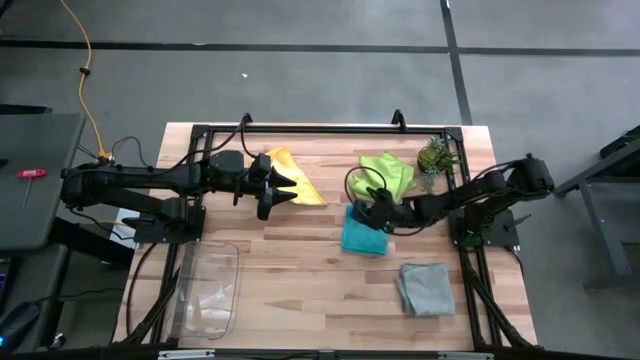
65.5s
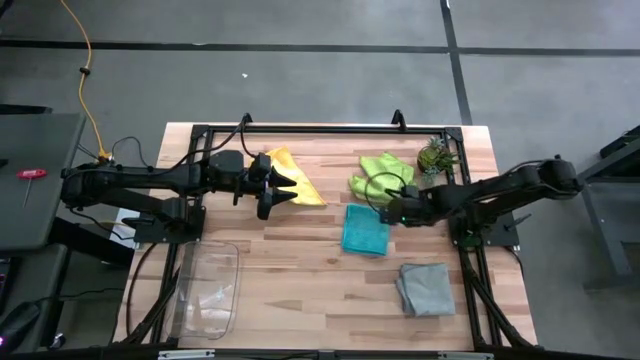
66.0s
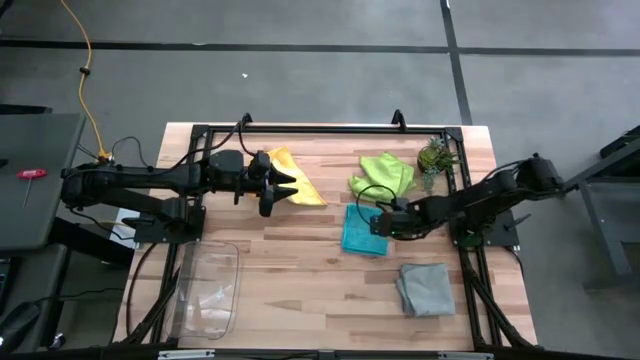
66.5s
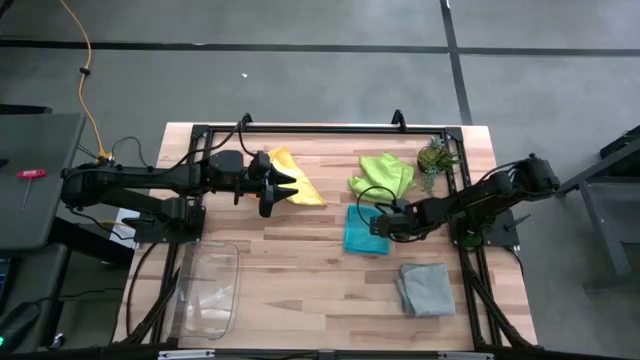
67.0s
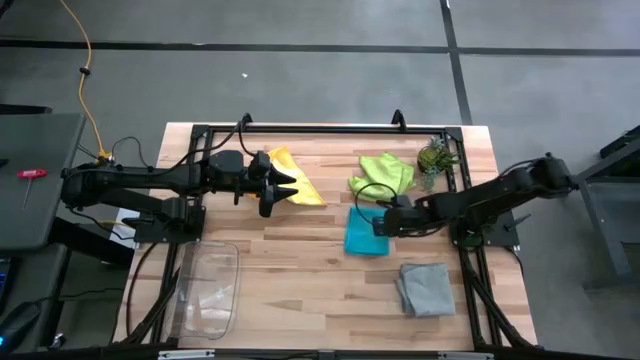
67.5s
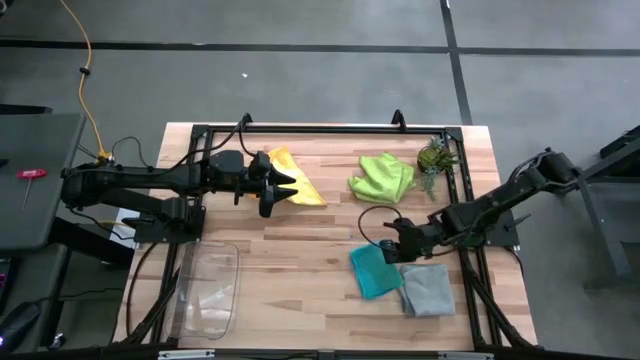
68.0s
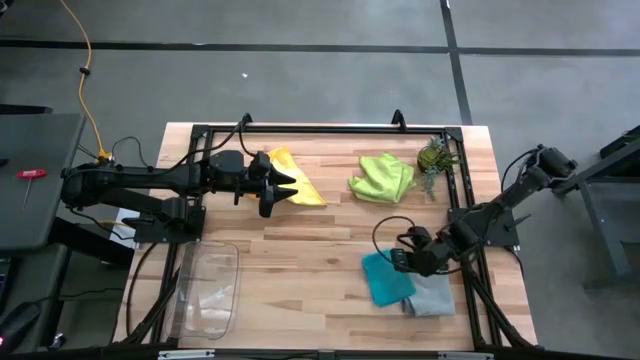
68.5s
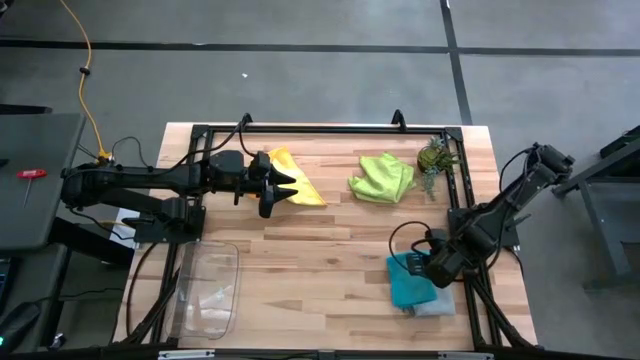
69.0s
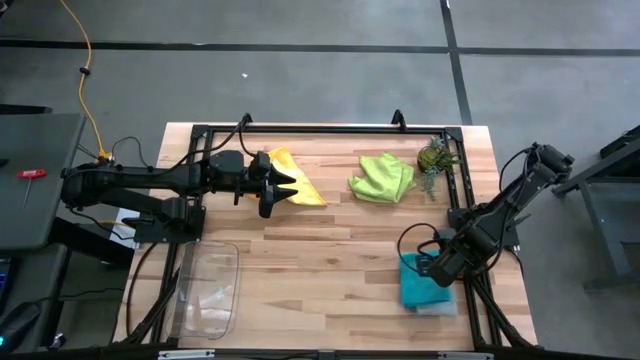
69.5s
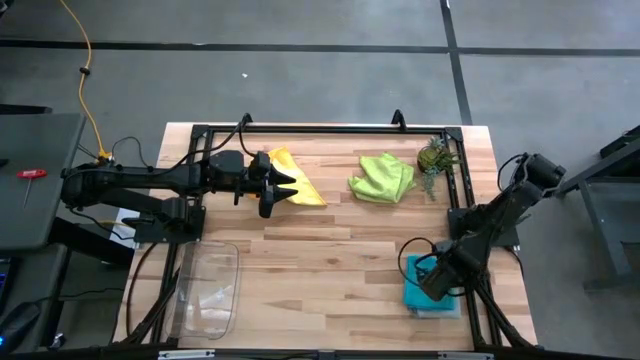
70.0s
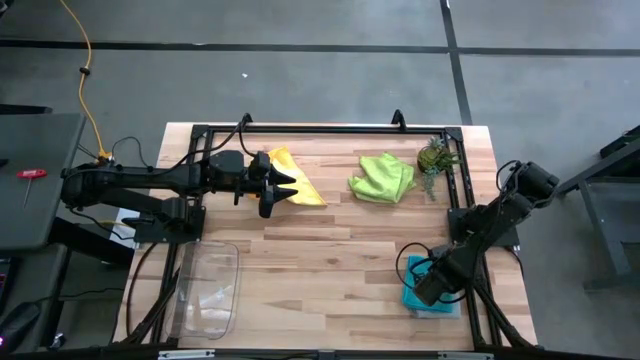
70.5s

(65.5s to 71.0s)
Task: Fold microfiber towels
Stack the blue microfiber cloth on top of the gray microfiber cloth

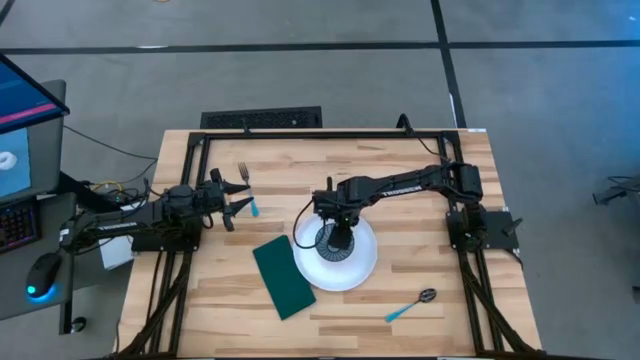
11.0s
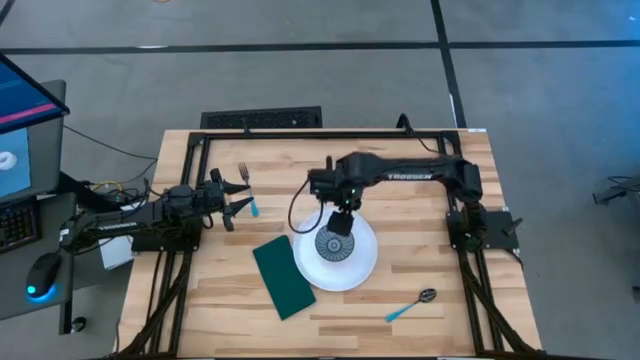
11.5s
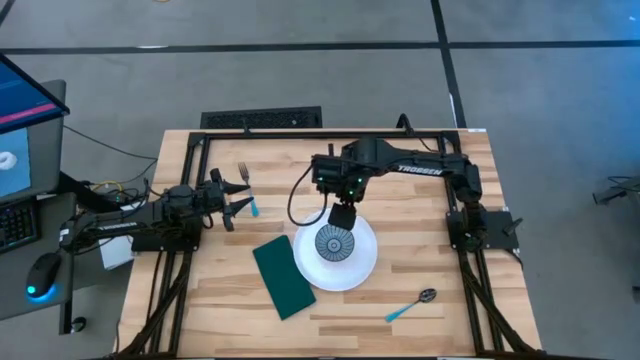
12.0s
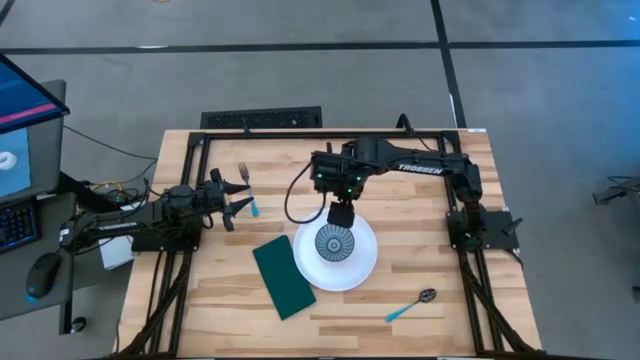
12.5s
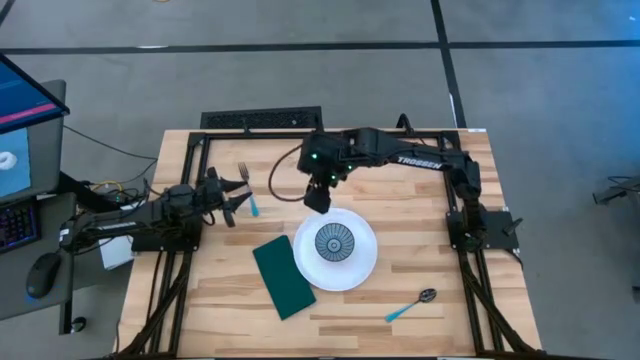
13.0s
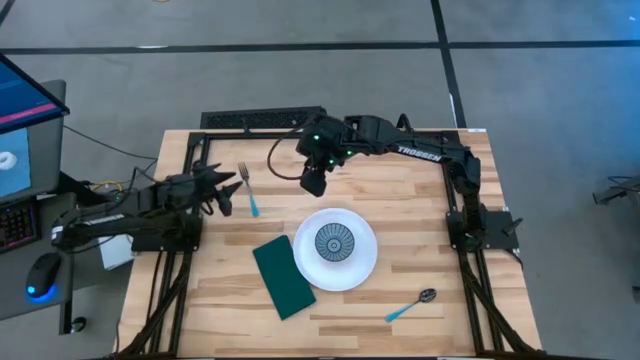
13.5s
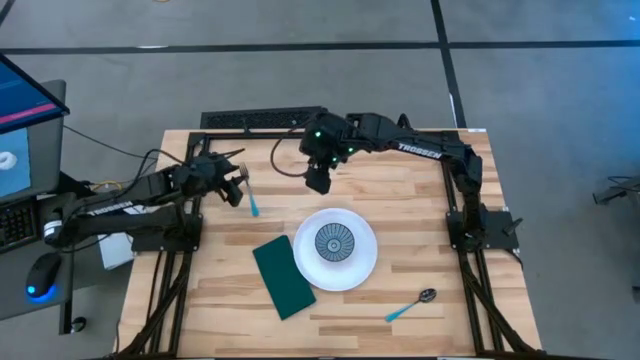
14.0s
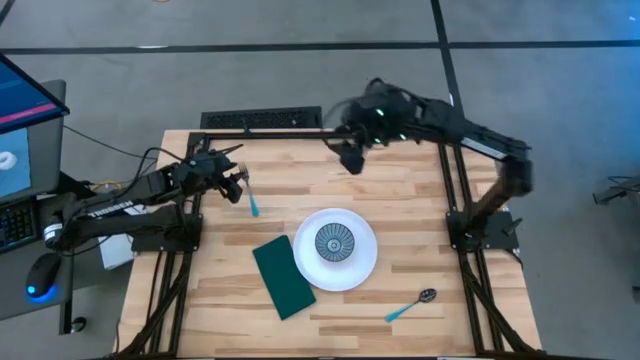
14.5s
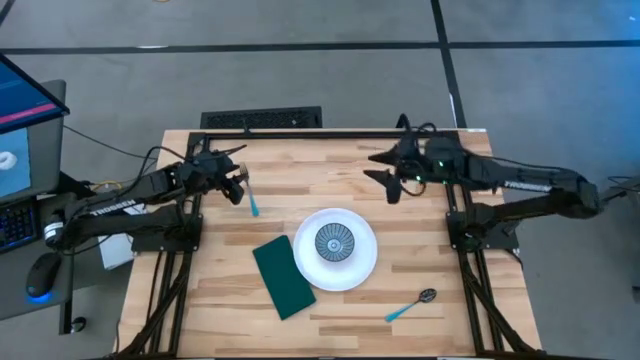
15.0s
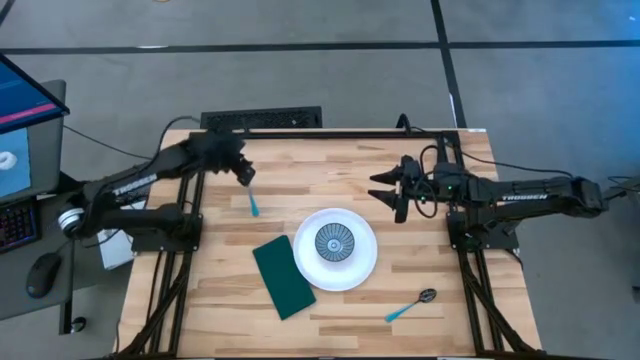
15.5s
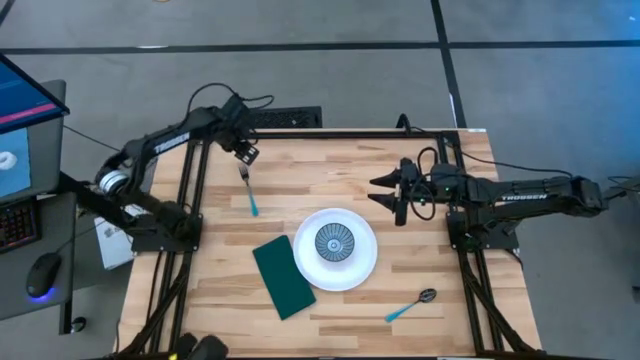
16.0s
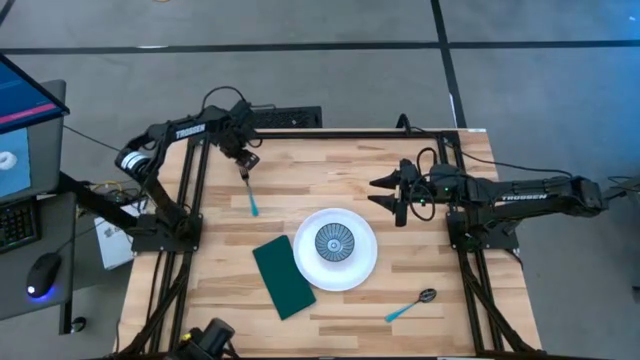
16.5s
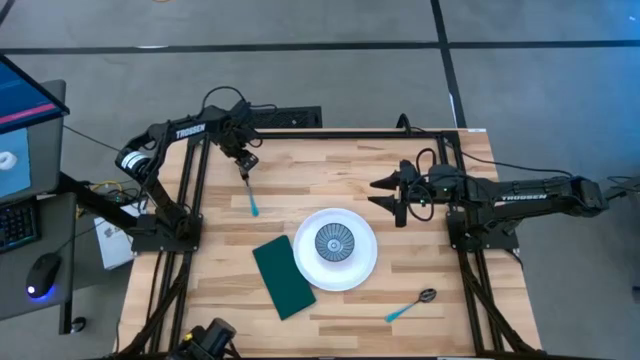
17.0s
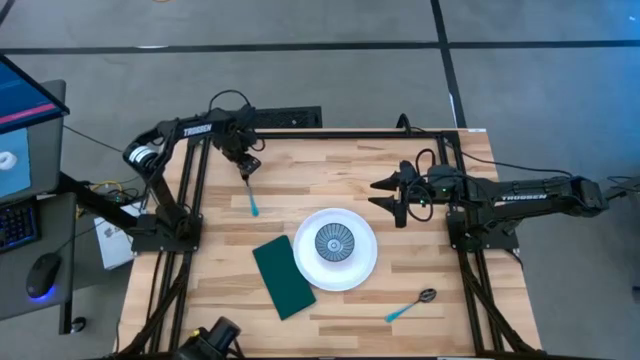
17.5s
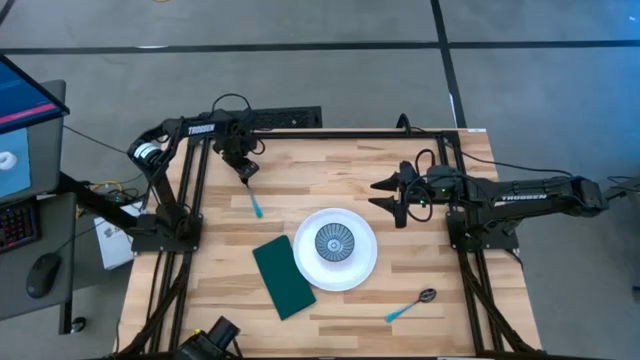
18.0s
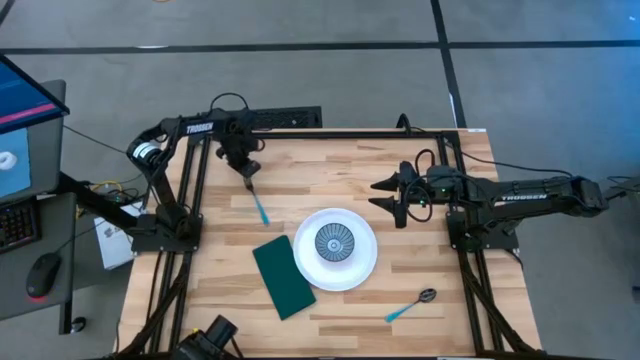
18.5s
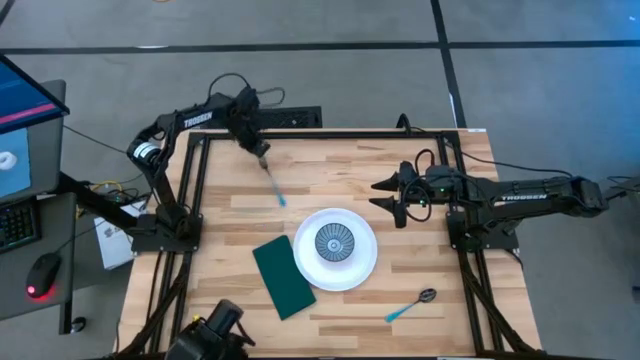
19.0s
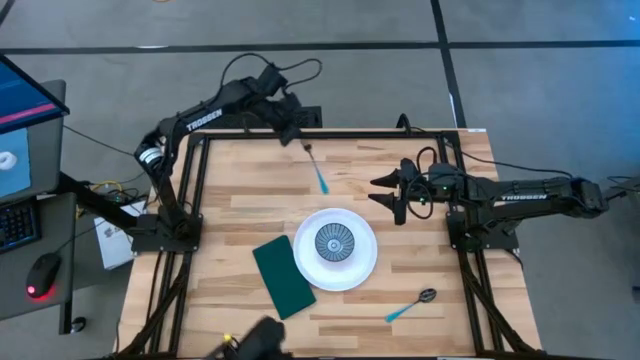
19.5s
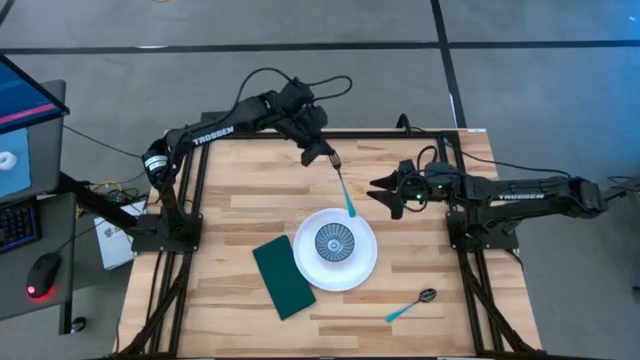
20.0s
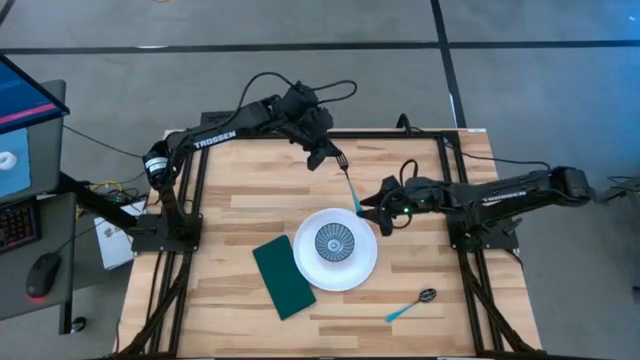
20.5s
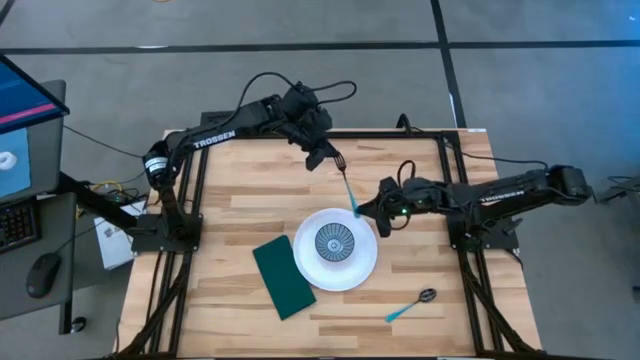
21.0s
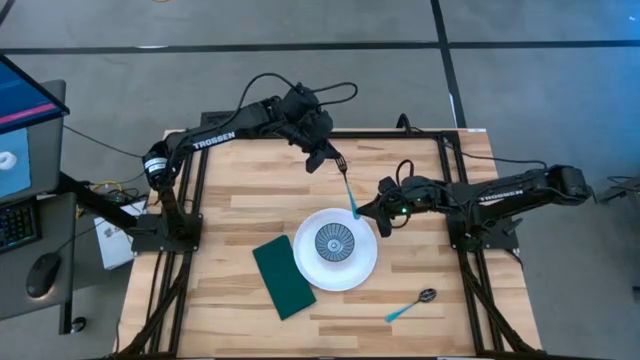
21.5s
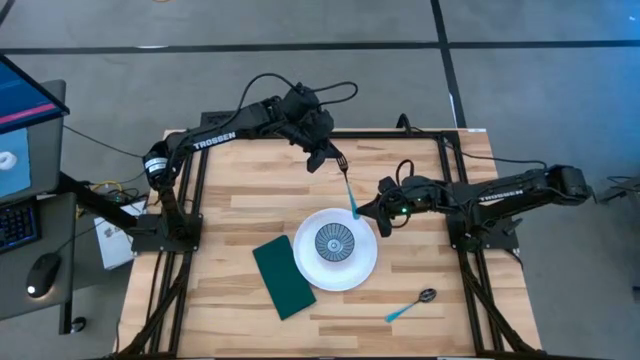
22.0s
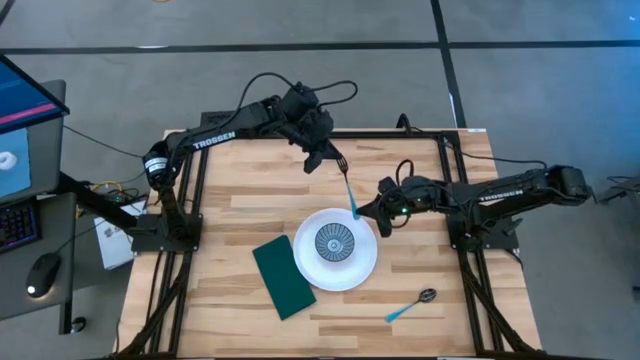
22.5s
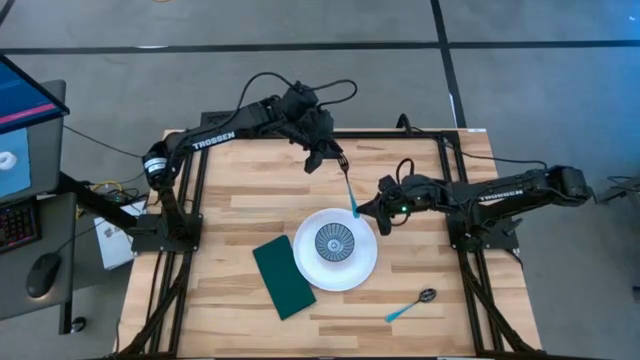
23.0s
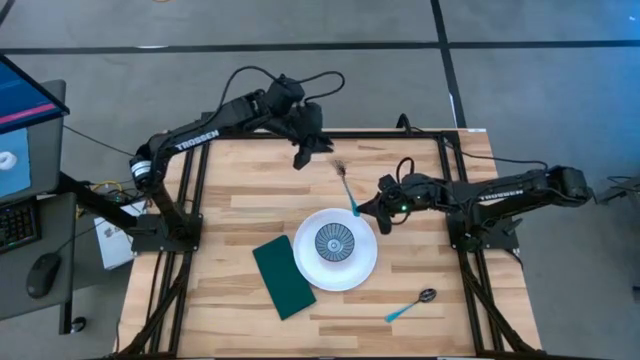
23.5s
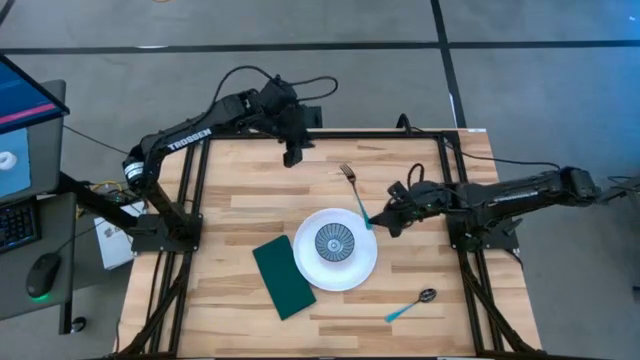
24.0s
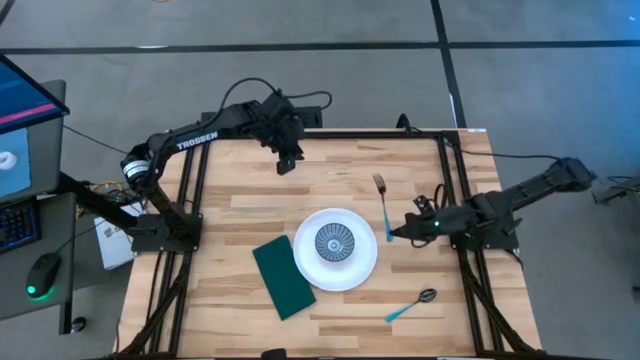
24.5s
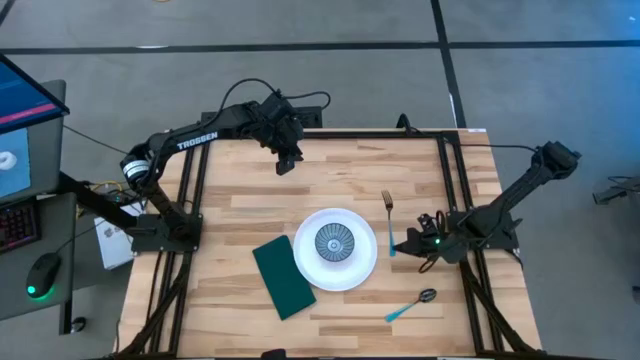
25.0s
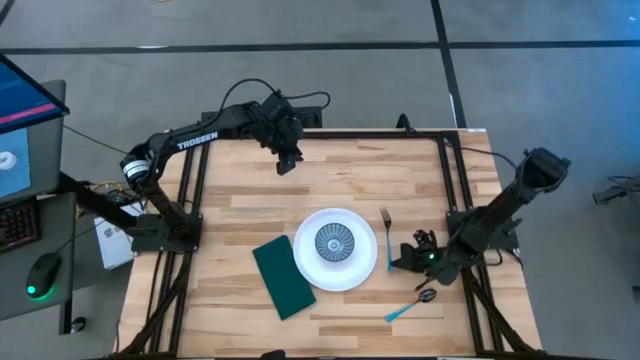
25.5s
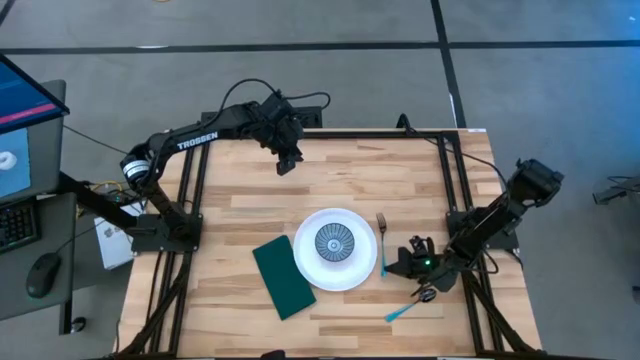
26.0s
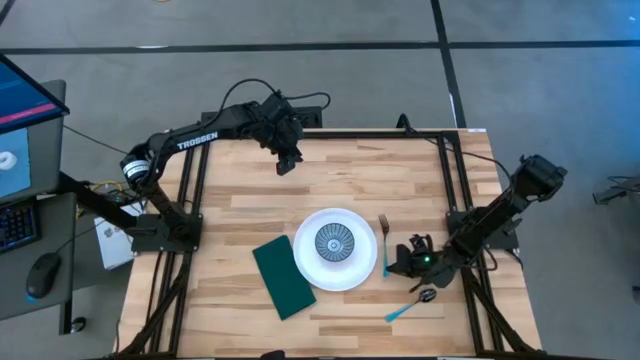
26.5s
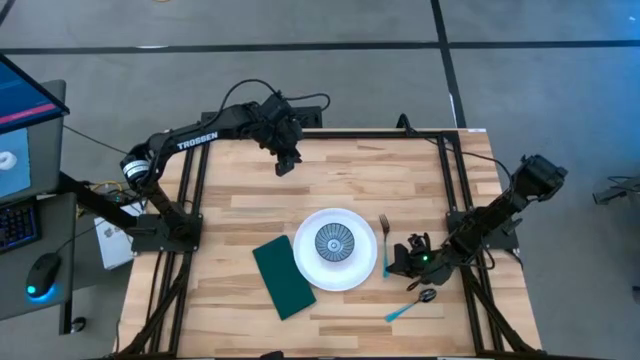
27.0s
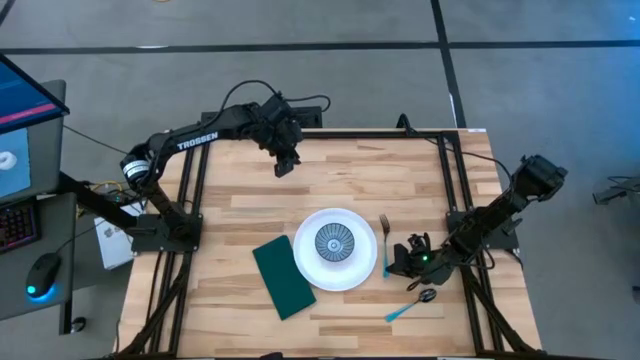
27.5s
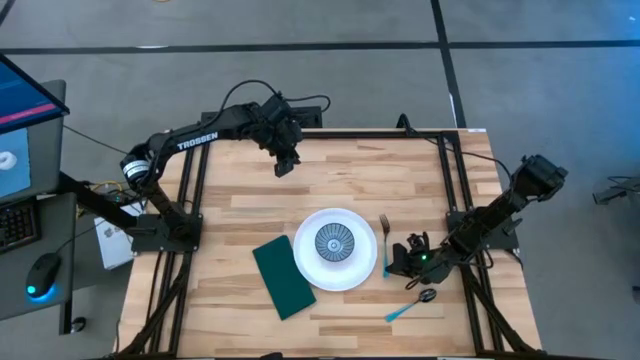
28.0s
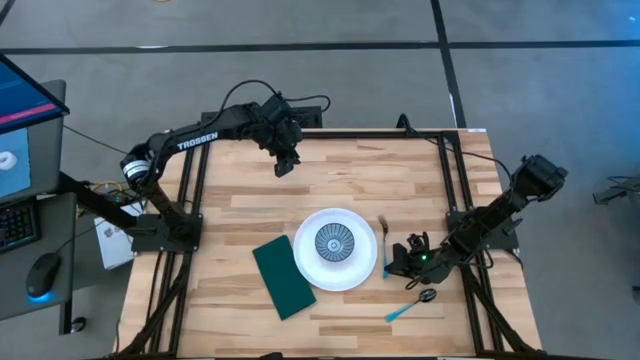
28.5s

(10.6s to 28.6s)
Task: Set table place
Put the blue fork to the right of the white plate
